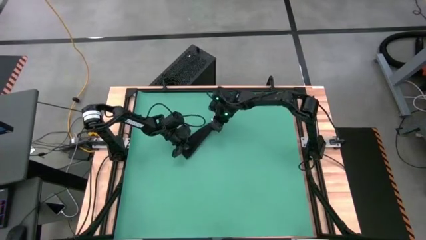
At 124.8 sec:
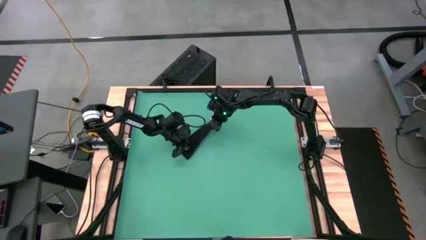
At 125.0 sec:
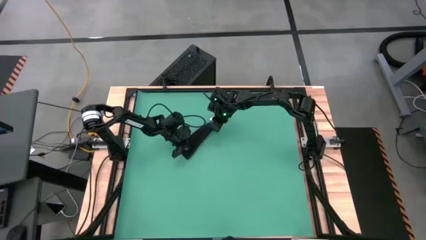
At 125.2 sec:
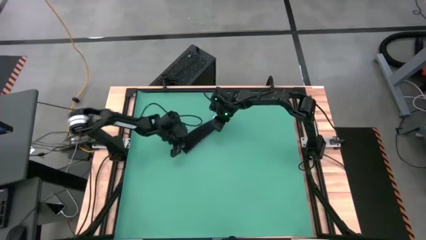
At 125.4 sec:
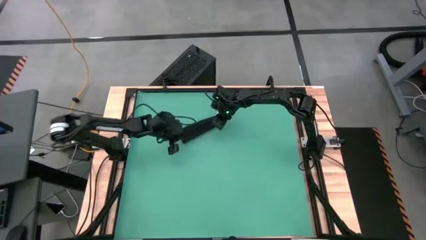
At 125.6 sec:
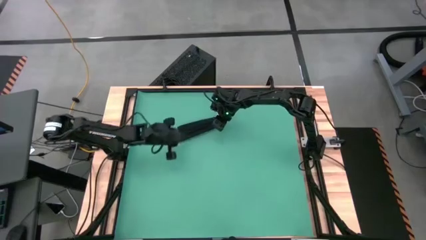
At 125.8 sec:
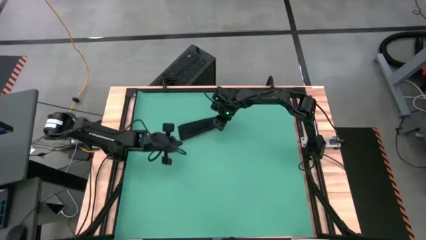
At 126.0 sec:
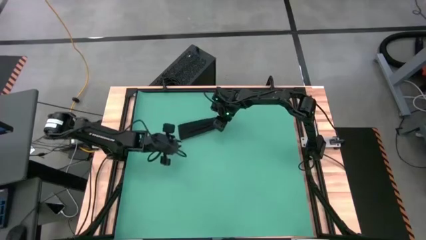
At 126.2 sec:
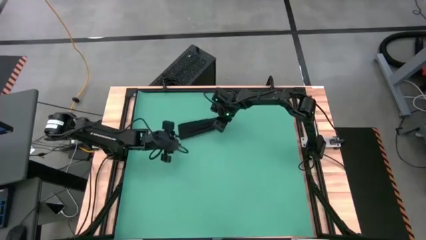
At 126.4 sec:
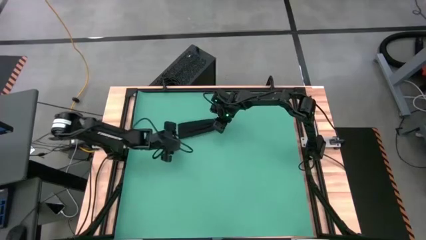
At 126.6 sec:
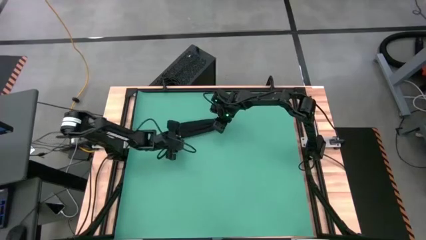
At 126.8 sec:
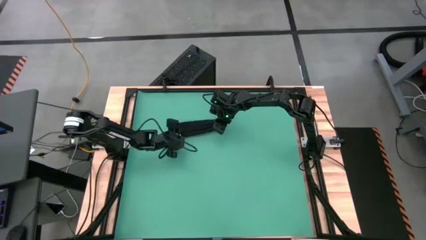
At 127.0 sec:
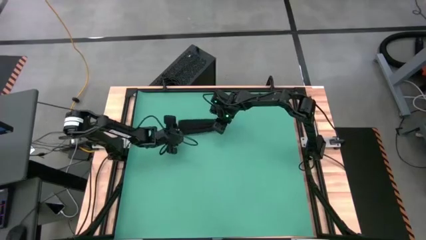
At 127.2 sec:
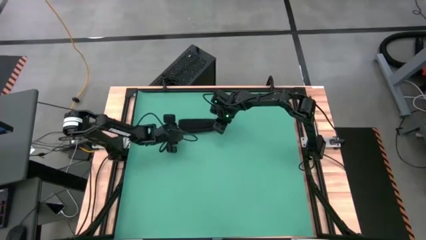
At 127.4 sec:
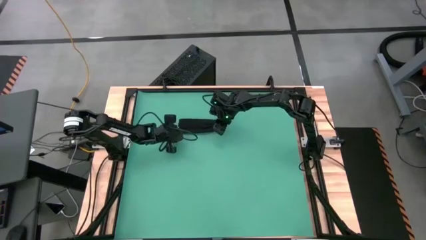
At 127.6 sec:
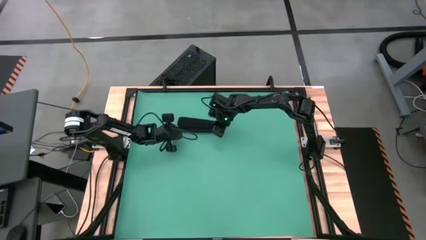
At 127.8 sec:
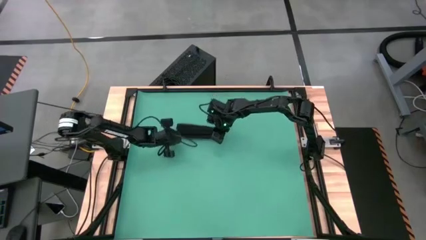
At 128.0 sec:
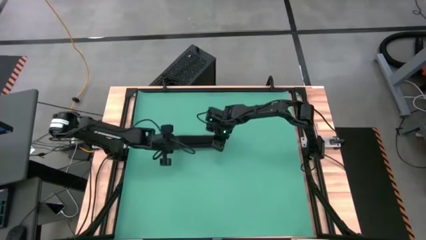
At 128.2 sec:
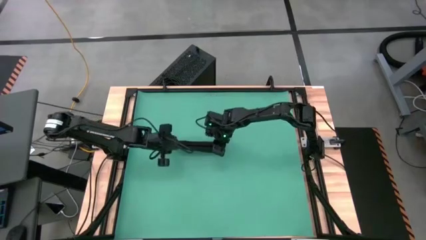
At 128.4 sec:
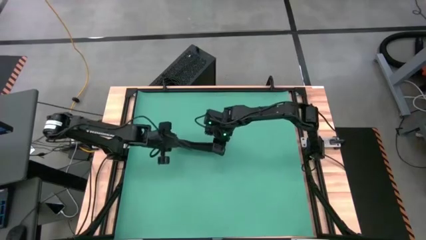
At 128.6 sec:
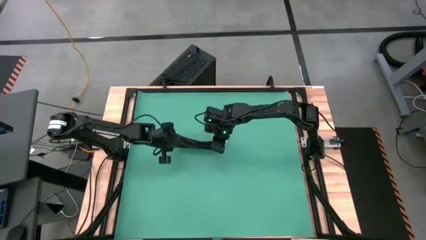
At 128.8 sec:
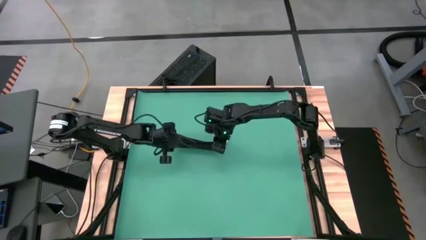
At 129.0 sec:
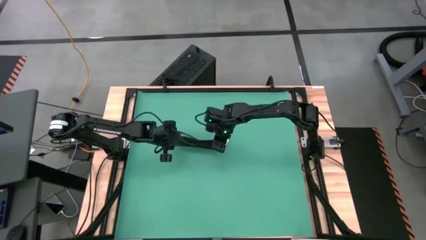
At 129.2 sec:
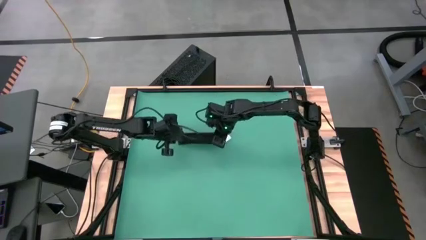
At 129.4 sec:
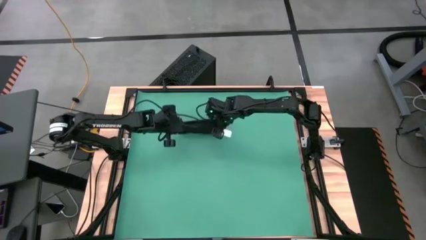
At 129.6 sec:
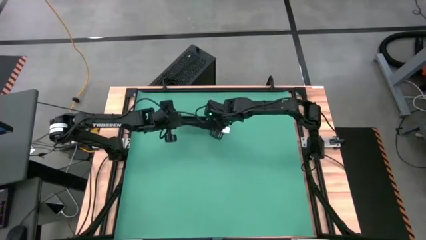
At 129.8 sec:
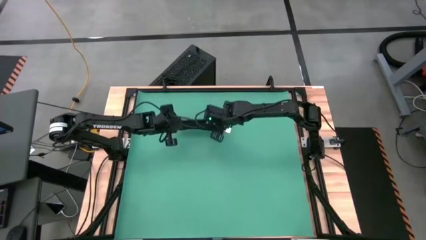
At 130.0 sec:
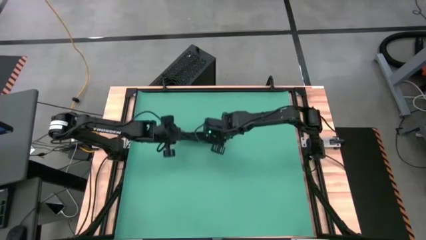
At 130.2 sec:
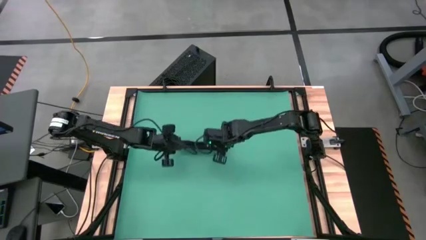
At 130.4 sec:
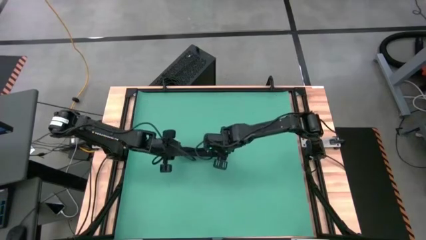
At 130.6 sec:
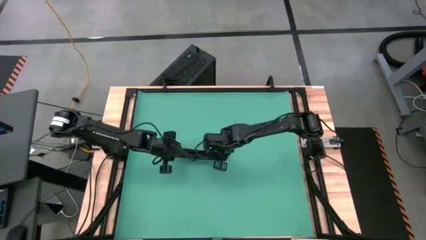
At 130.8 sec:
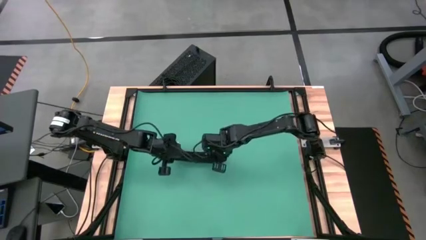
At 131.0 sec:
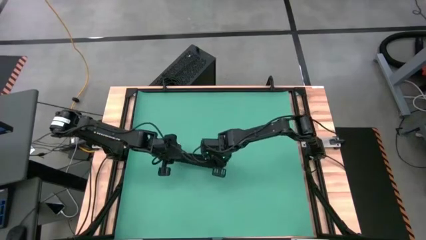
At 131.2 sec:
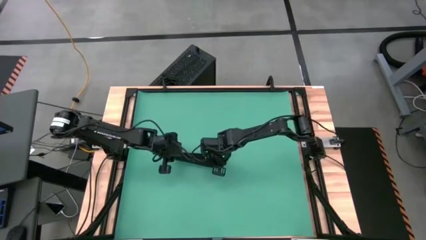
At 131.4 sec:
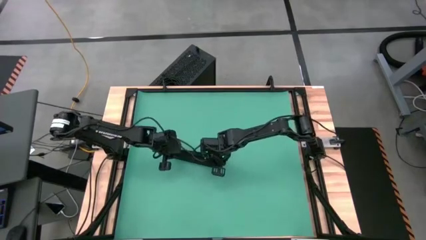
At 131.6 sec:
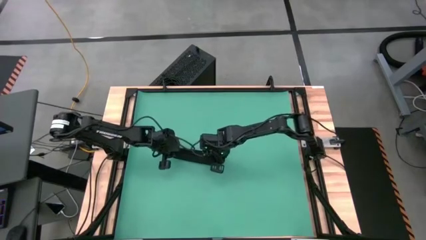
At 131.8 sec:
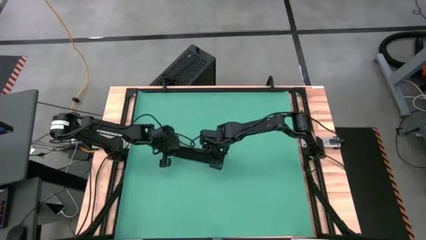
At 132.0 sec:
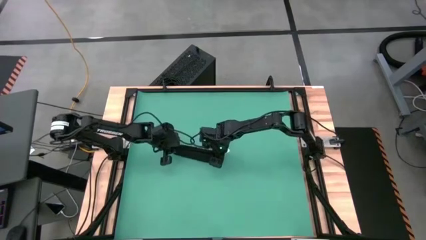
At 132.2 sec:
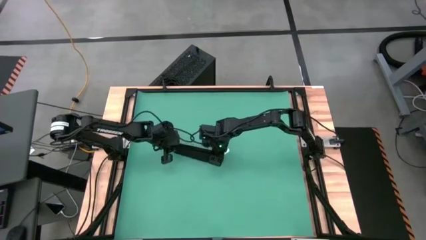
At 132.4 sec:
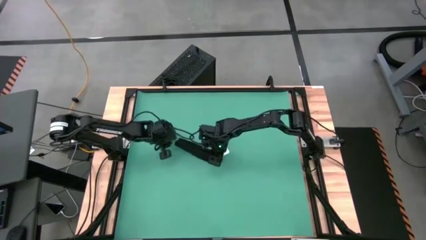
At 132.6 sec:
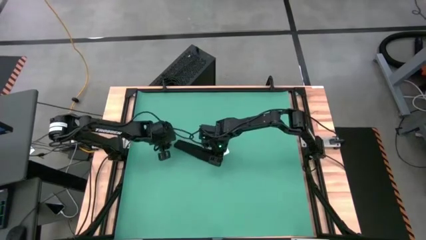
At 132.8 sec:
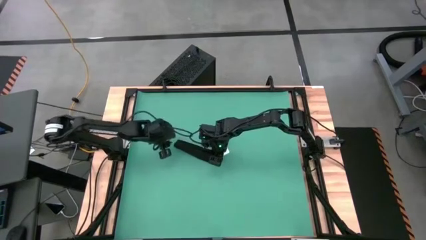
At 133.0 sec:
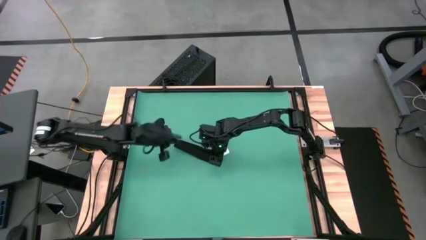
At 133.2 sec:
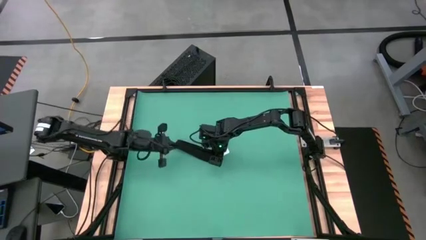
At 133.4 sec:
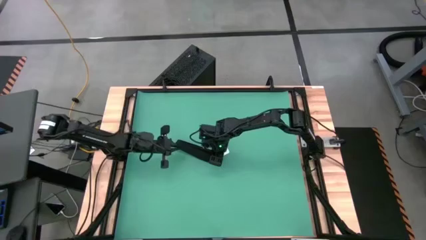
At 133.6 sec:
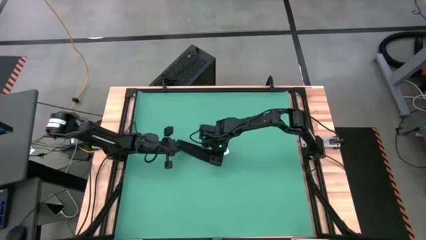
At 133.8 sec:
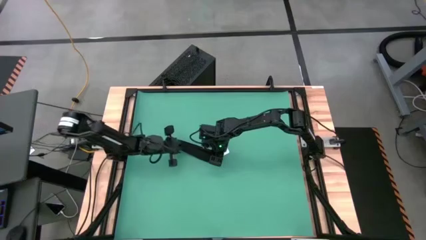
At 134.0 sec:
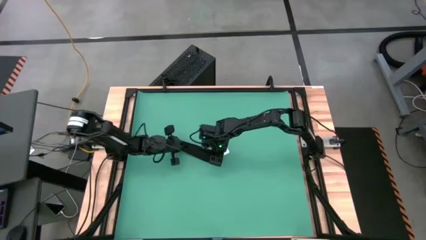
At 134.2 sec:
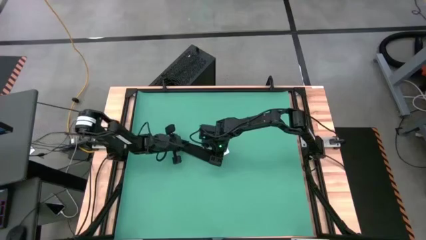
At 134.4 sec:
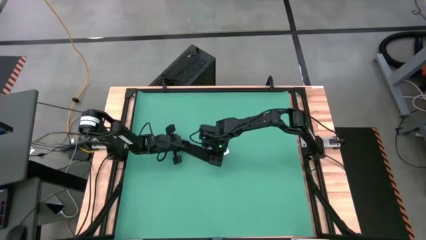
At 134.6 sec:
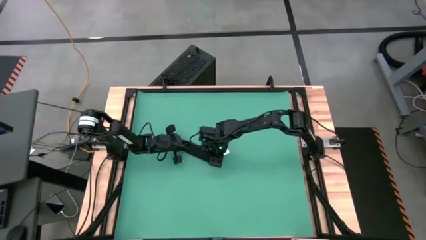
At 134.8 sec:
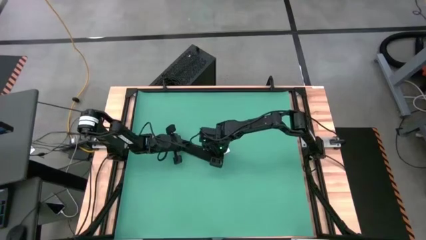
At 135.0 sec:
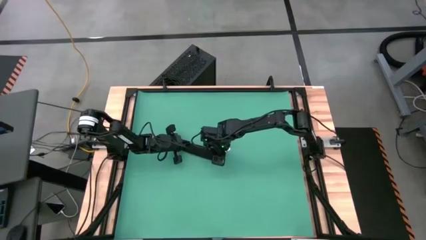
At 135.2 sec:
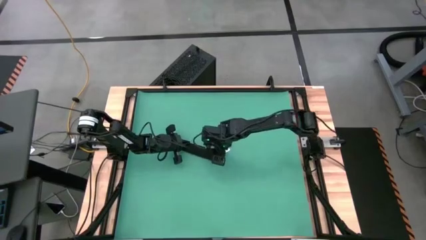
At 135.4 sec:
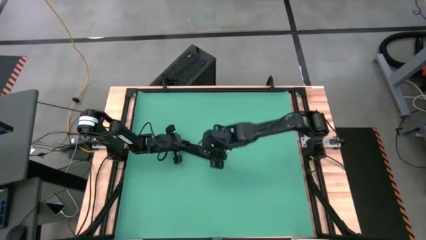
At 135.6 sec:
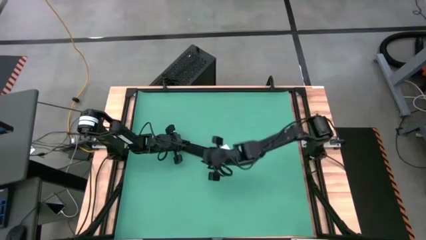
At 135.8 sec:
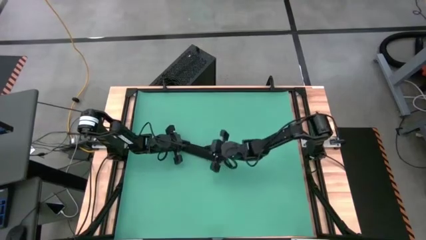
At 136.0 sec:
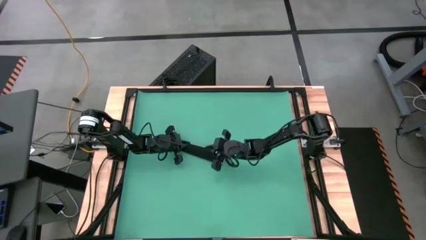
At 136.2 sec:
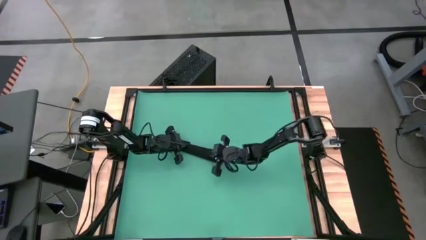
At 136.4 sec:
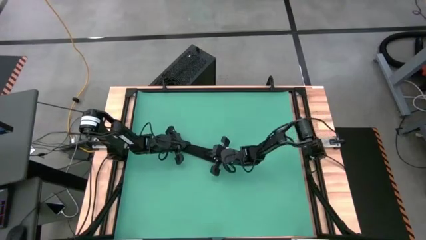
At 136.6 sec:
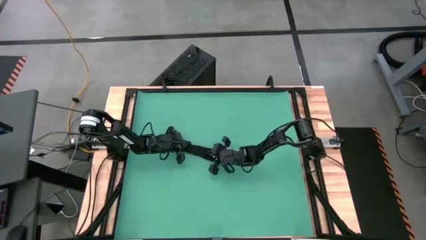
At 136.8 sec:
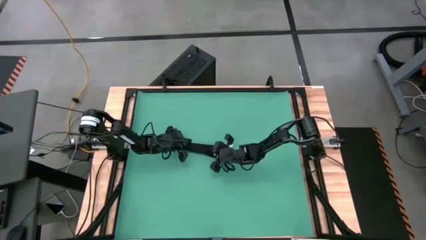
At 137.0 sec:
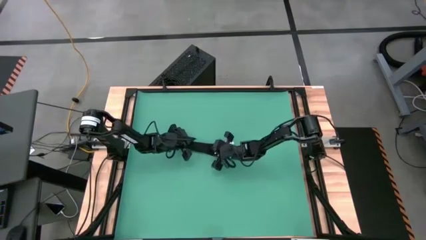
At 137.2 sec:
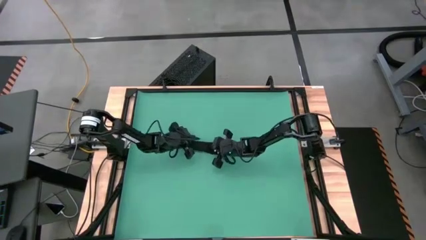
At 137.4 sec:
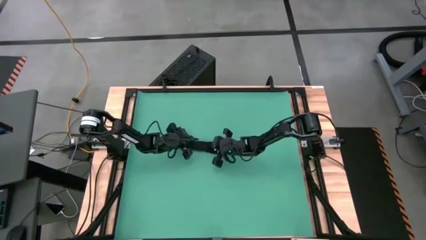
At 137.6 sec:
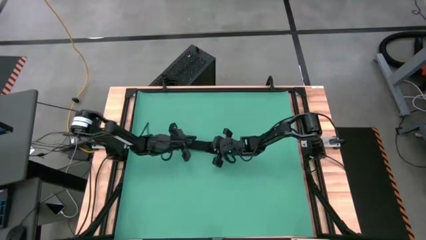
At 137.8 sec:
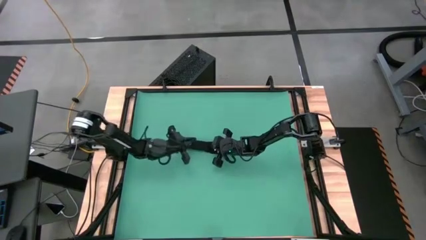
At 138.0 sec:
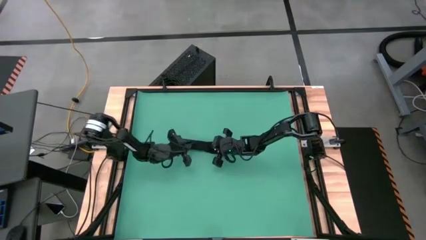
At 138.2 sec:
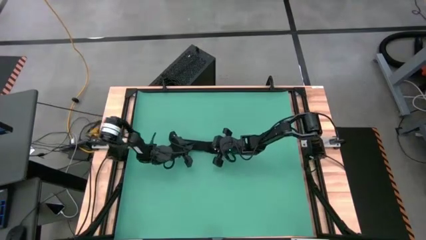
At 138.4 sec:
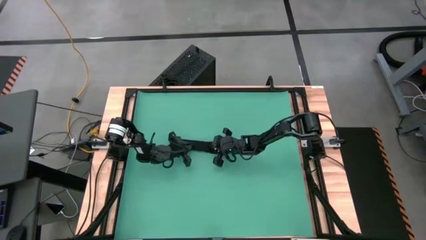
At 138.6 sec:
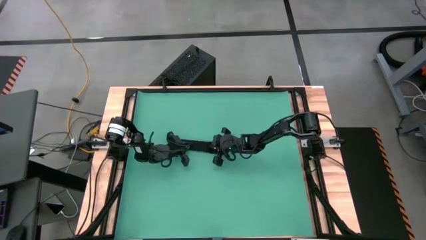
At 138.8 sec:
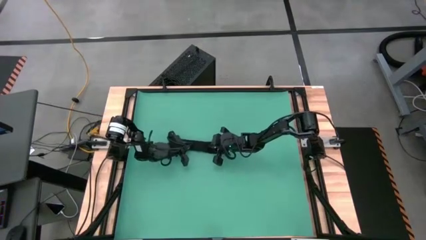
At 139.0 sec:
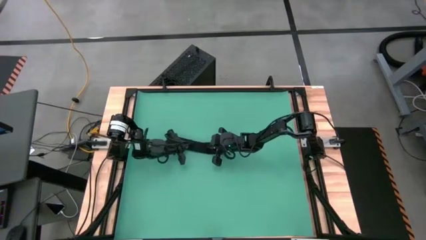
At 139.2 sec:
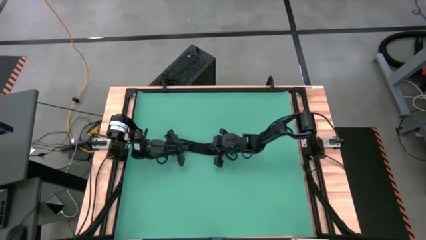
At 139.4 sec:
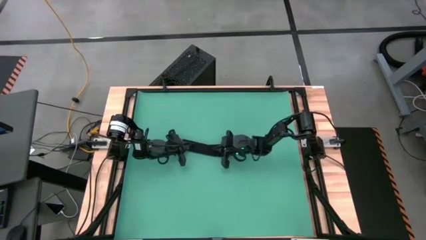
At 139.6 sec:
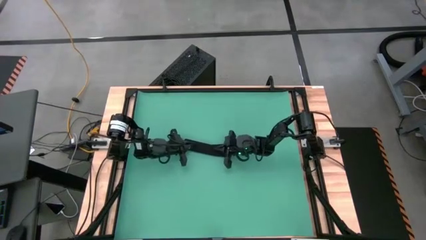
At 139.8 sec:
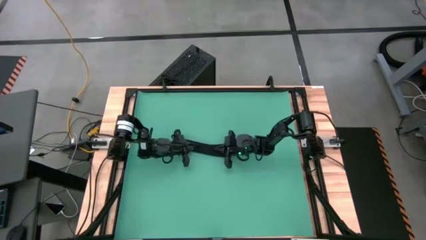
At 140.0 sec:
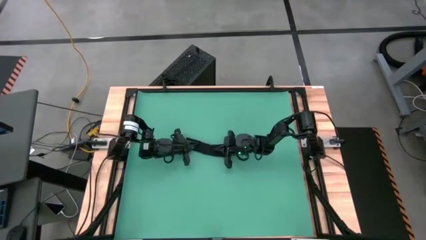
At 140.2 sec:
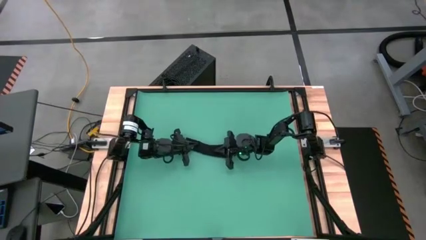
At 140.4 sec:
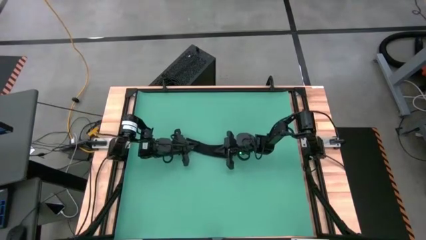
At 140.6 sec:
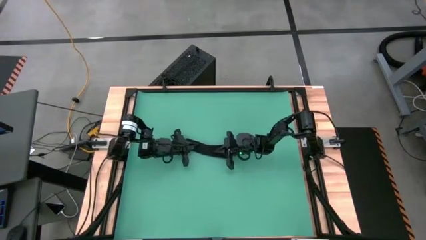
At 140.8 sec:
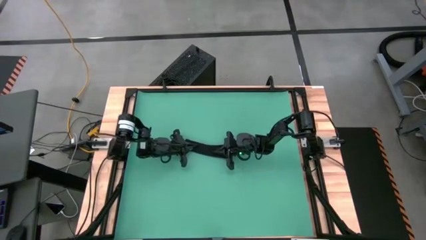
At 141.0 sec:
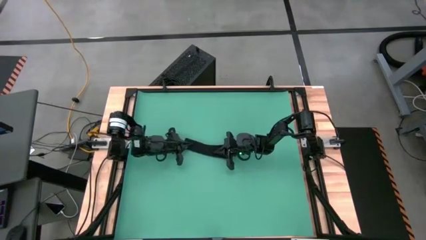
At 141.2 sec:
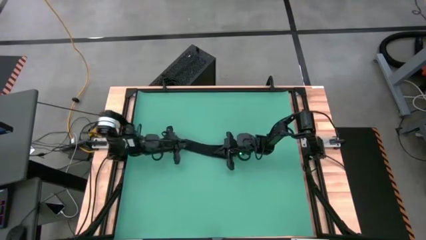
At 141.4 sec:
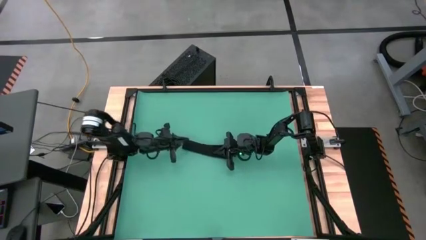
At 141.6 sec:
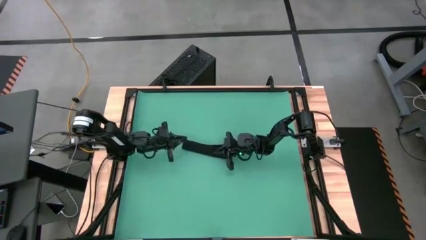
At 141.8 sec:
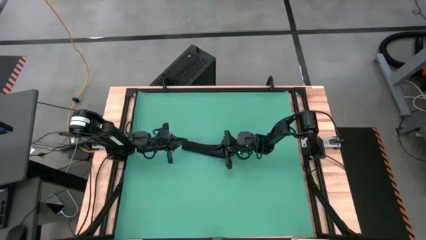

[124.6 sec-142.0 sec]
Task: Roll towel
Roll the black towel
